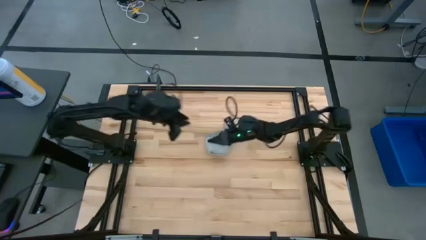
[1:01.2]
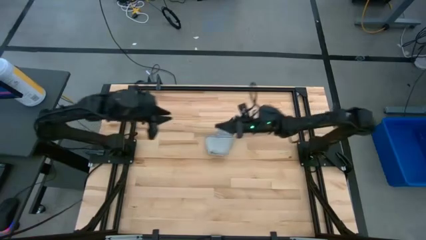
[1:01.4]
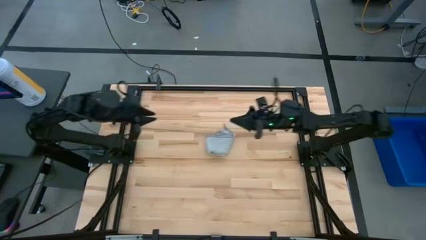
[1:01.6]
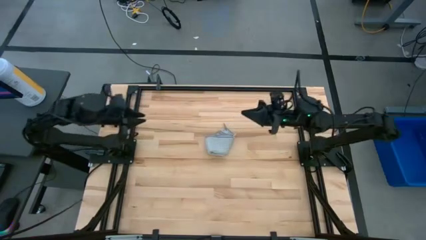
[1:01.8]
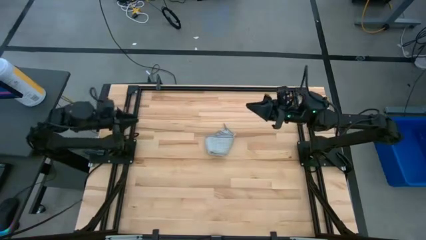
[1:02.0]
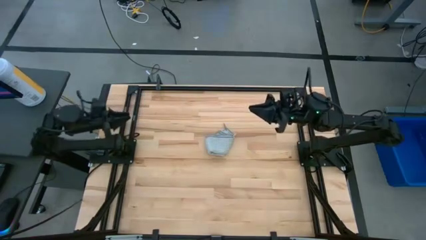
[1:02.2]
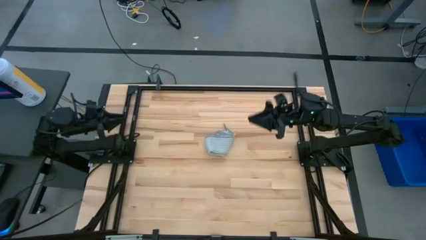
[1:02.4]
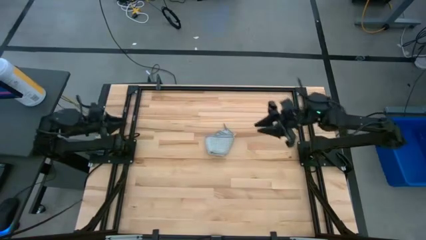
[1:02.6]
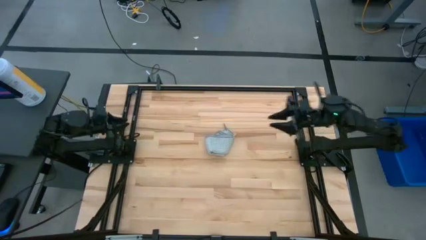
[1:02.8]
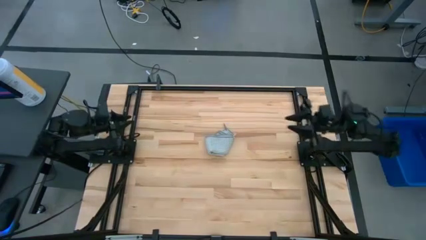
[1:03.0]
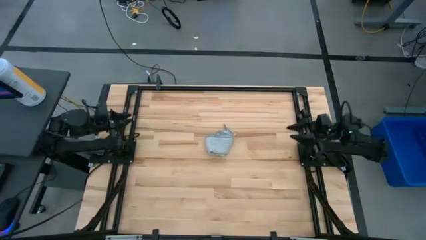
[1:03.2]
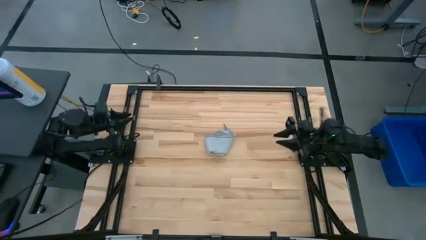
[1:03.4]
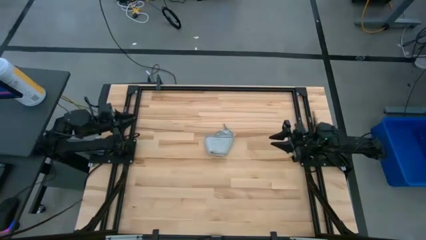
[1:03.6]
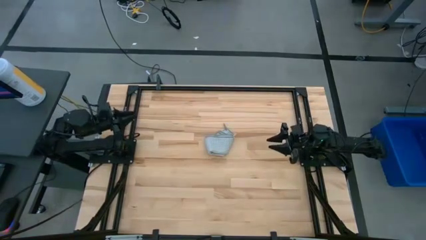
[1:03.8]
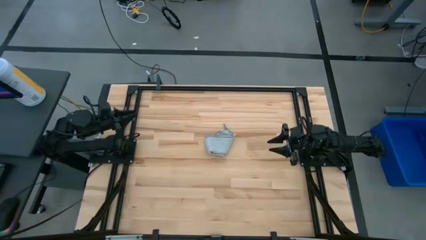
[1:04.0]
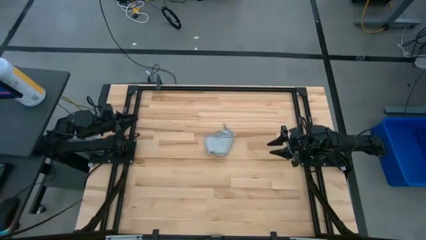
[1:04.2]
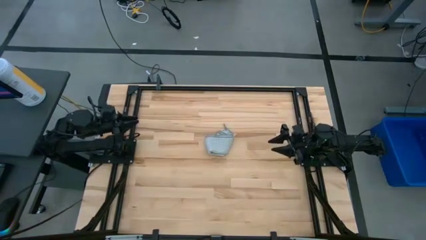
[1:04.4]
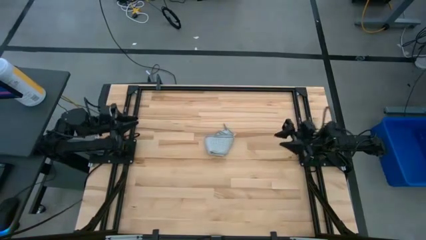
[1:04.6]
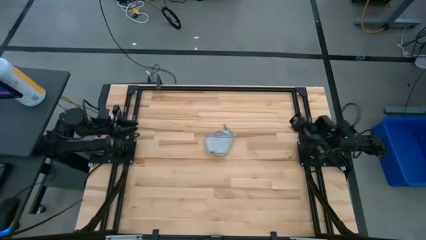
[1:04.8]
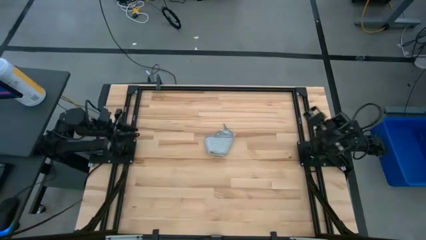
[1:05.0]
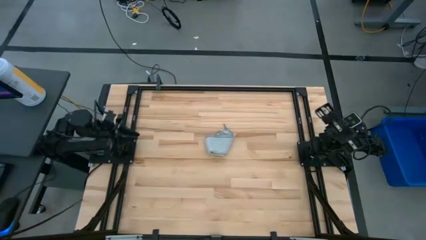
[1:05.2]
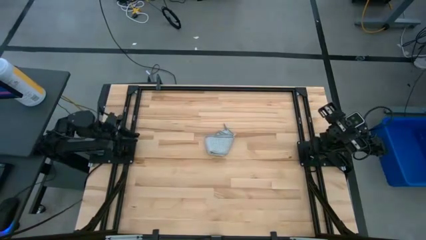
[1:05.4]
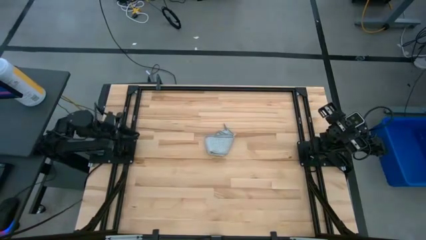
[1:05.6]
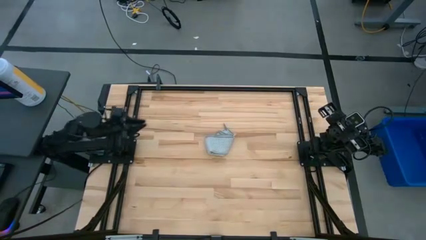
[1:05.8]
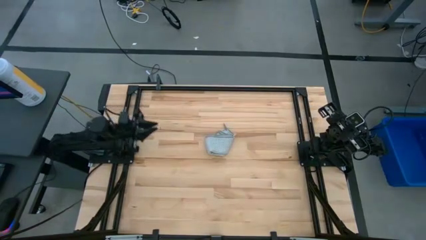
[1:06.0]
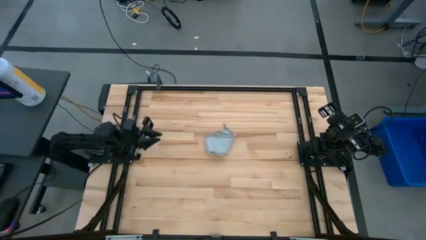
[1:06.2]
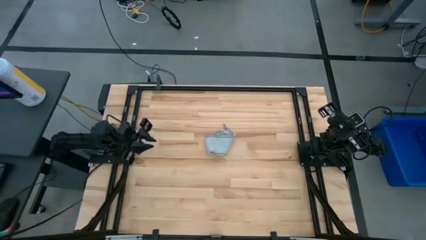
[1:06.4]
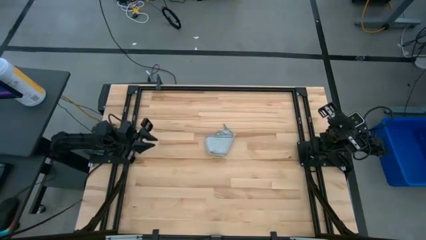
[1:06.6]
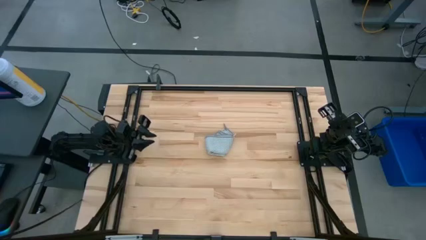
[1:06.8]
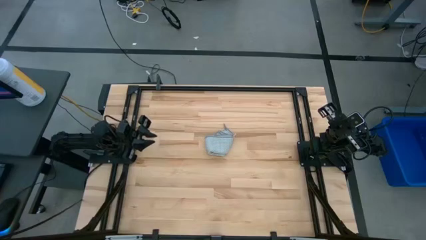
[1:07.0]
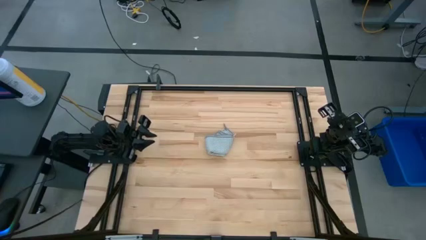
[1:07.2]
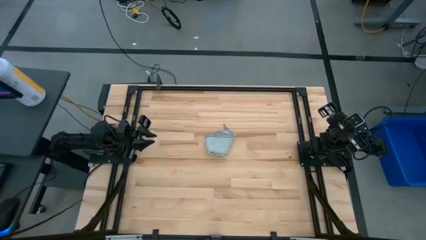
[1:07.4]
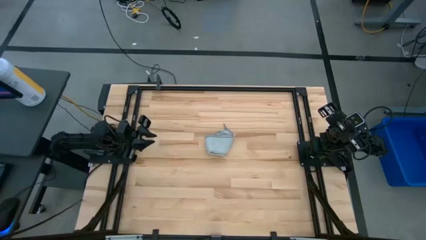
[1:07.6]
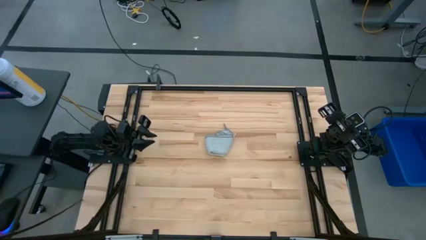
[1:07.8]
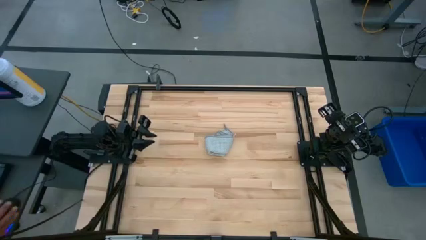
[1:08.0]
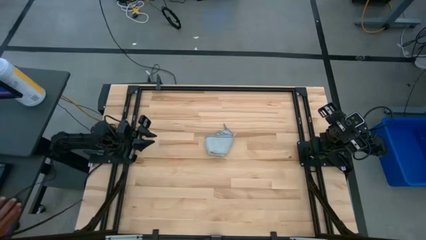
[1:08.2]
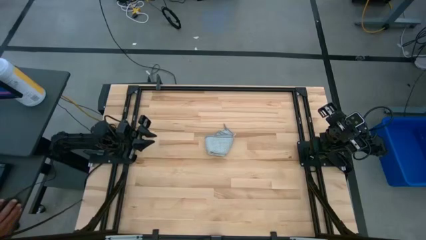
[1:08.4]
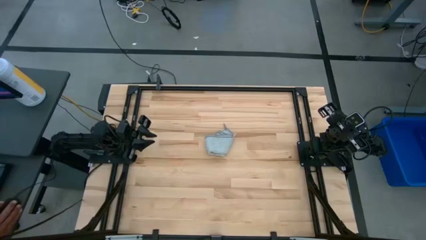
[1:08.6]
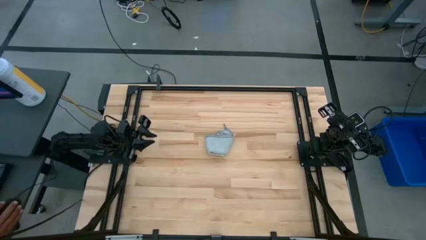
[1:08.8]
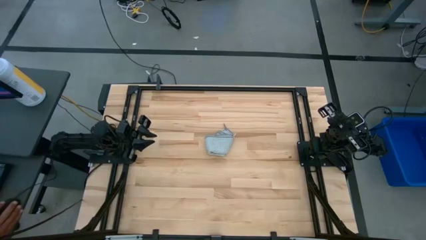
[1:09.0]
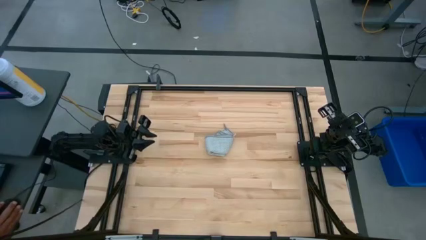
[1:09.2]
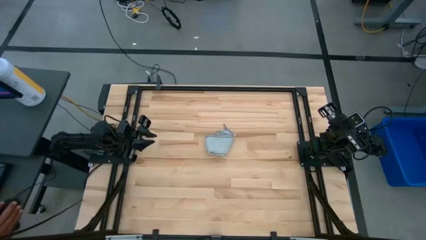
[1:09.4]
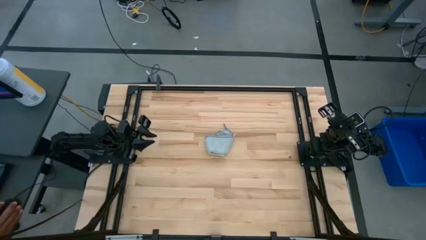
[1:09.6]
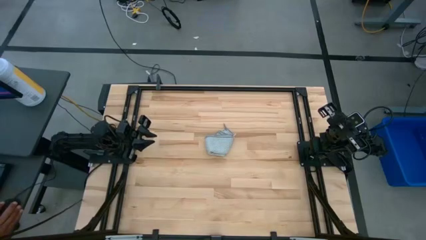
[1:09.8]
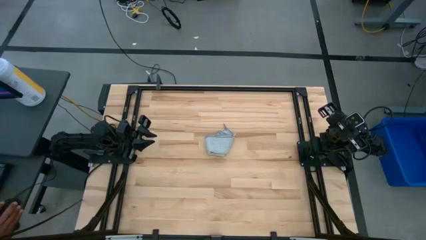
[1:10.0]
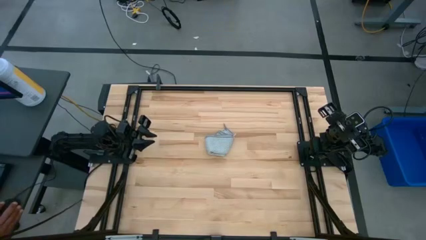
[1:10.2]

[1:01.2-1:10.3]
Task: Fold microfiber towels
Return to Home Position

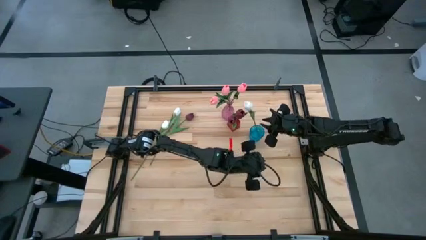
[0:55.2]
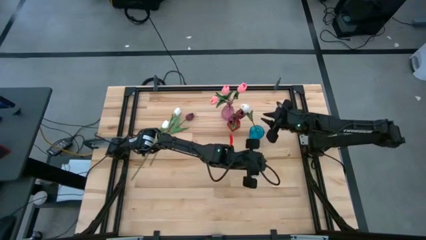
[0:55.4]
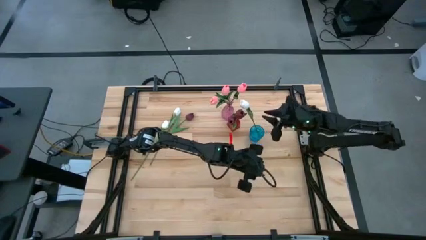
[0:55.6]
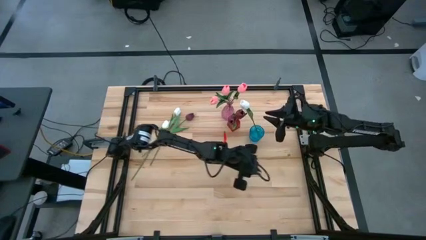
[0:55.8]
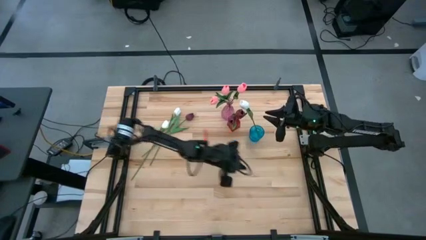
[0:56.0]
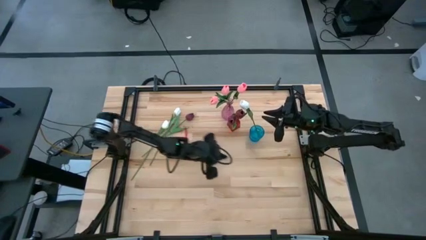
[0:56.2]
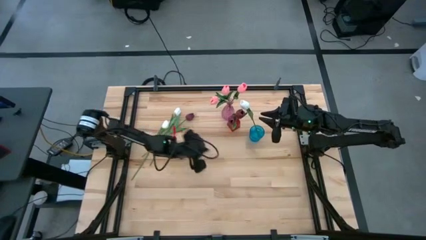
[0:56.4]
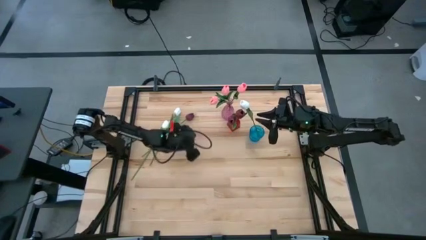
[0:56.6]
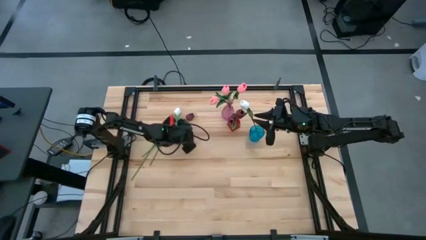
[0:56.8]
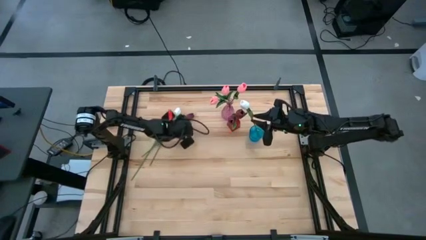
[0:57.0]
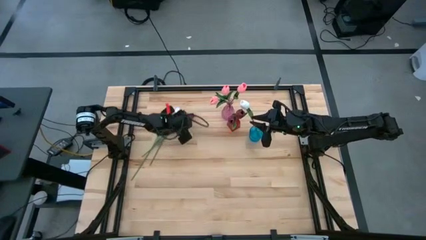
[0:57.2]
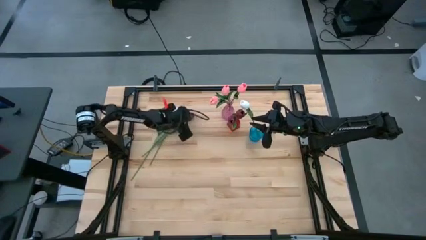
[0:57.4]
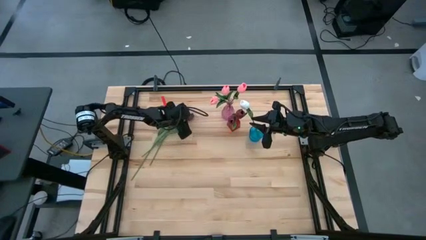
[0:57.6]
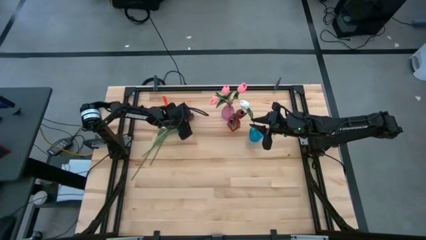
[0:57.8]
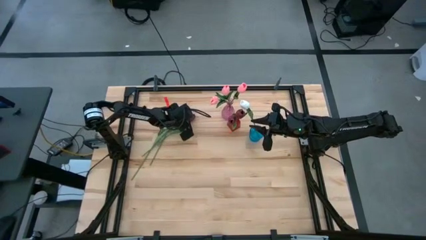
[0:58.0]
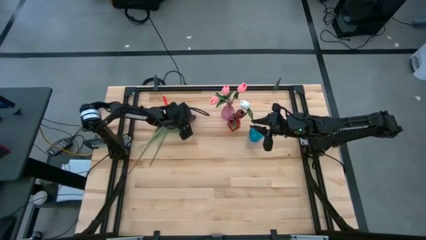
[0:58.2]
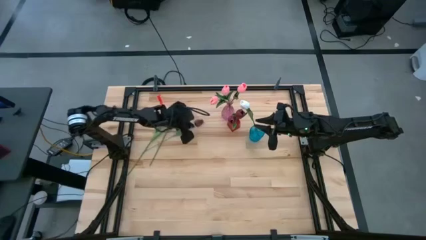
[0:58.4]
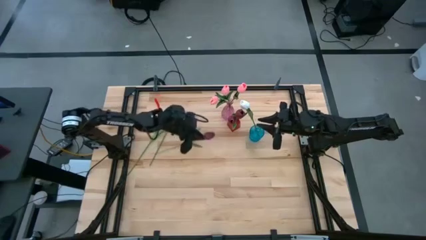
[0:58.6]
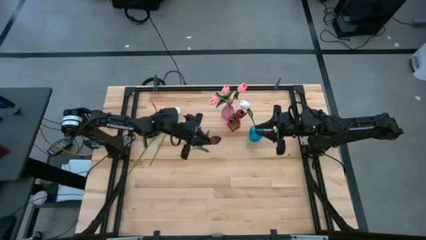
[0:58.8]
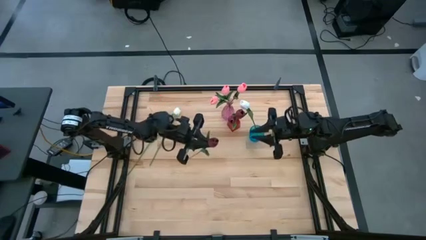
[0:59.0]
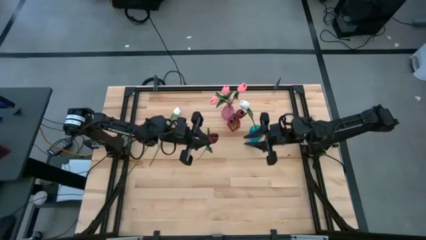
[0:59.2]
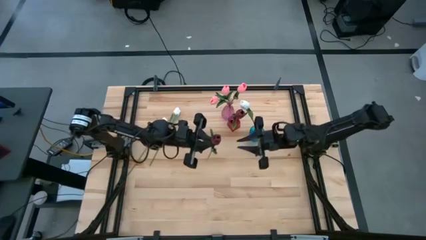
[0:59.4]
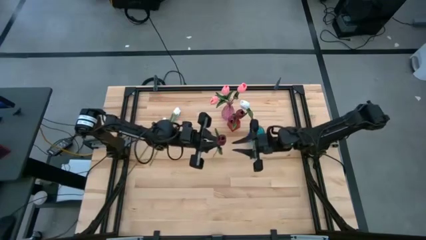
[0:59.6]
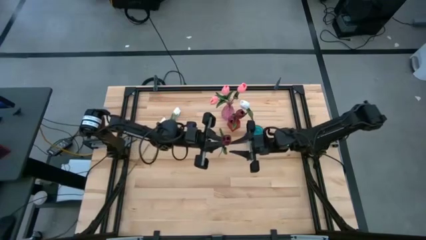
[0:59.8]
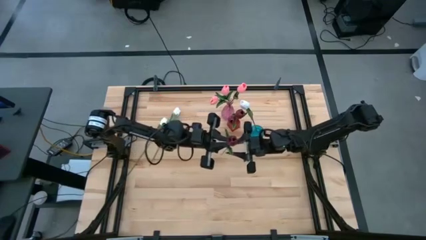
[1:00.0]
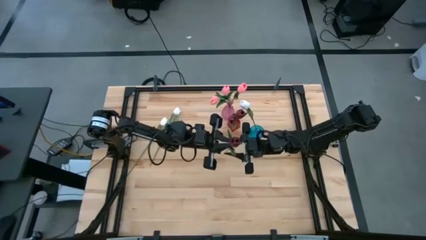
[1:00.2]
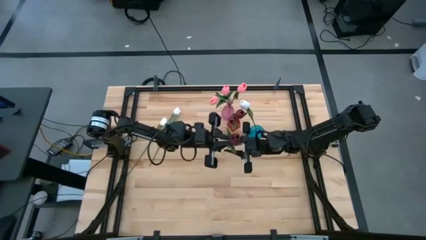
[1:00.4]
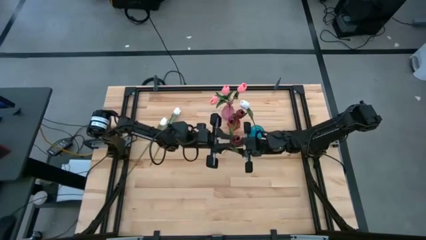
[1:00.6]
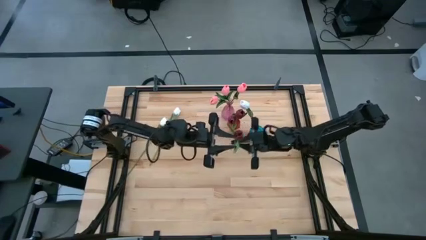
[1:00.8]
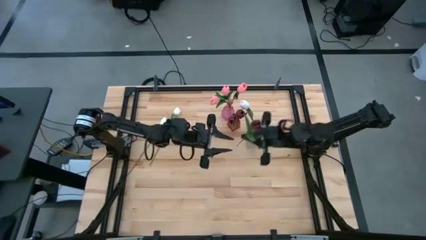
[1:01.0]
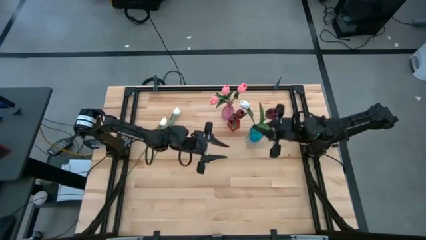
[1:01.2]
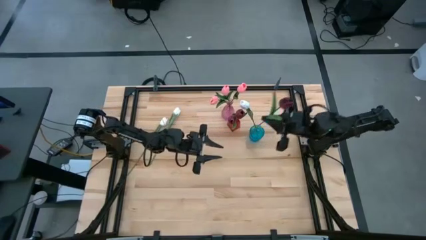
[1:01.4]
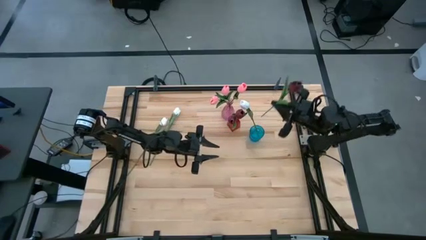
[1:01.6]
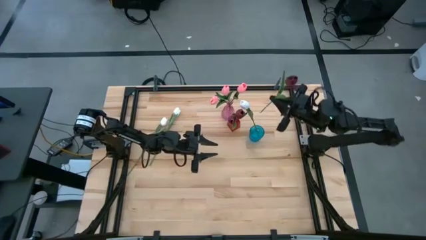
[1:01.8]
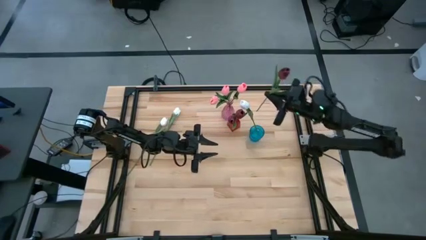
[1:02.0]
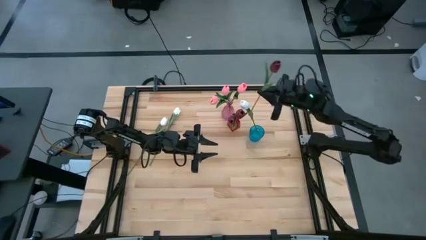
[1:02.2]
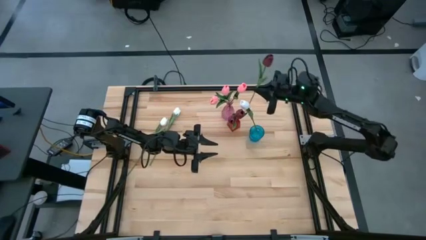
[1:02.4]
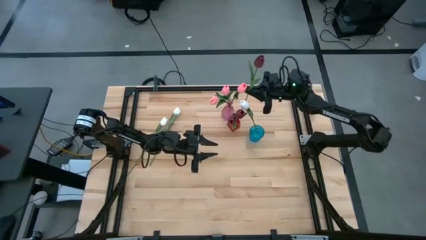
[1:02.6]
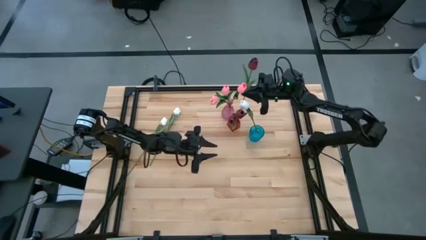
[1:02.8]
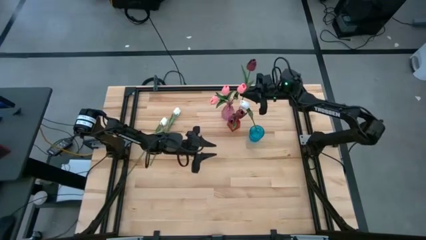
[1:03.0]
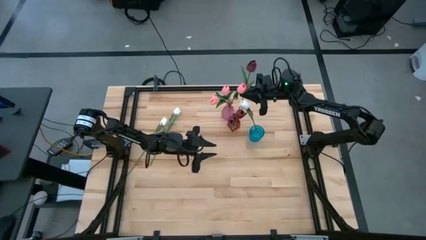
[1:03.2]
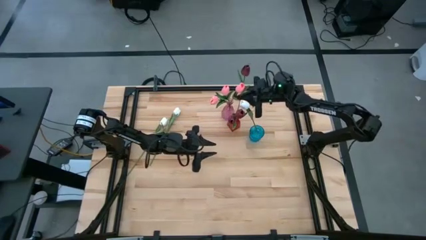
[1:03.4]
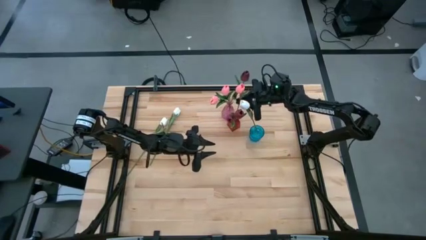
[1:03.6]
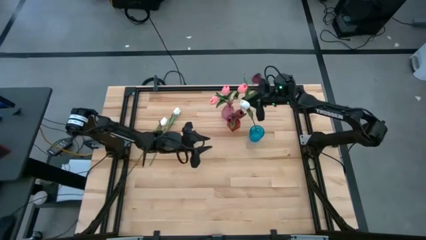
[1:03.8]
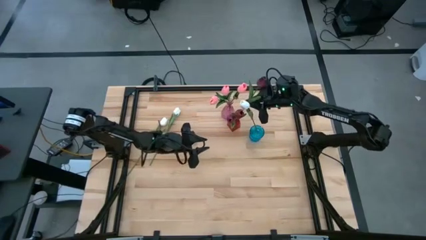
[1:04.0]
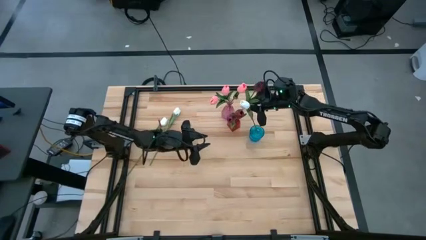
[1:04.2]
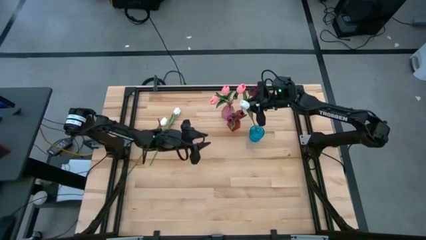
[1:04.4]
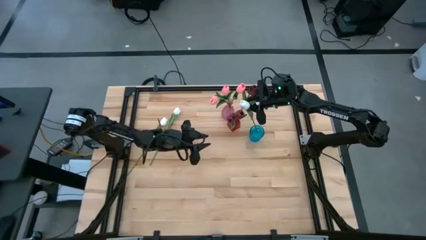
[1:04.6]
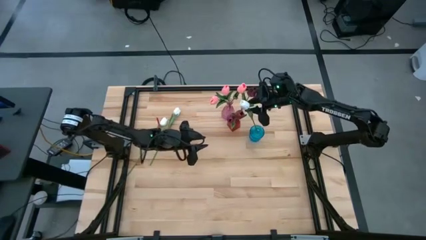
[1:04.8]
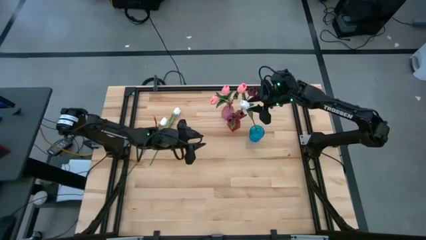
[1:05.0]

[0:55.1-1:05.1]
Task: Sort flowers into vase by color
Put the red flower into the red vase
